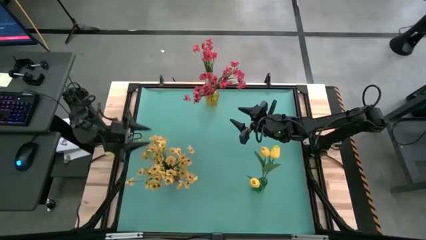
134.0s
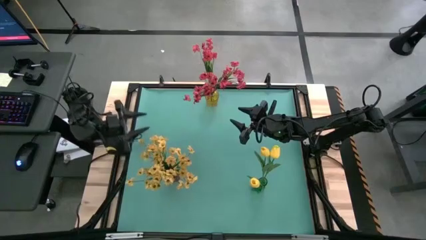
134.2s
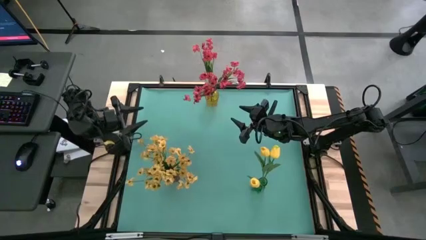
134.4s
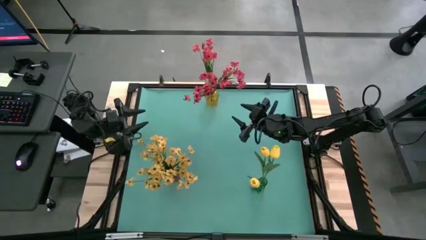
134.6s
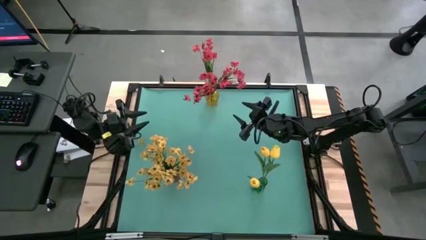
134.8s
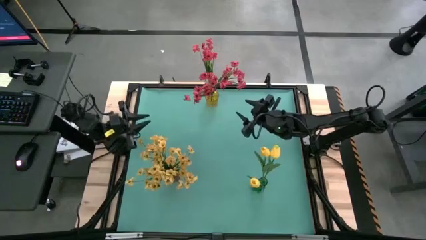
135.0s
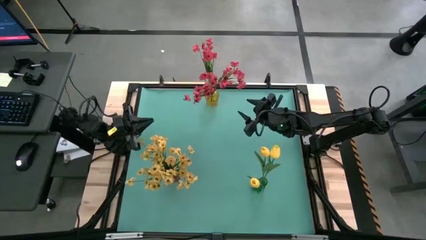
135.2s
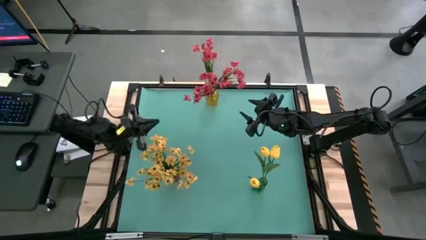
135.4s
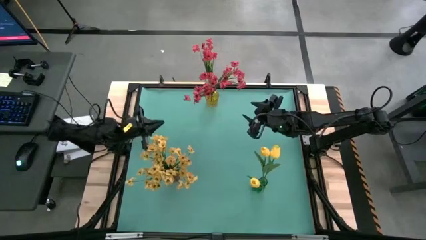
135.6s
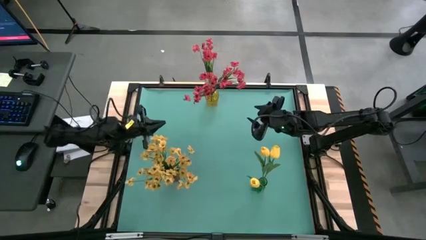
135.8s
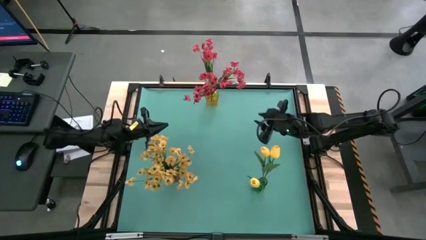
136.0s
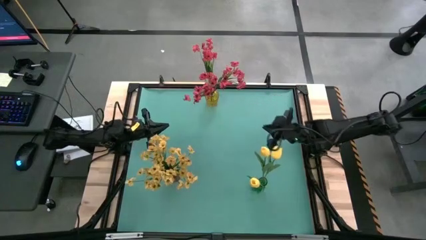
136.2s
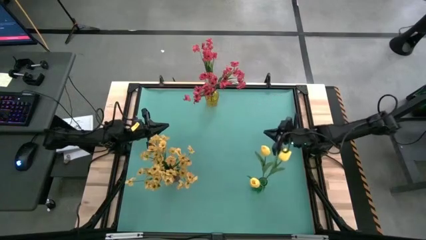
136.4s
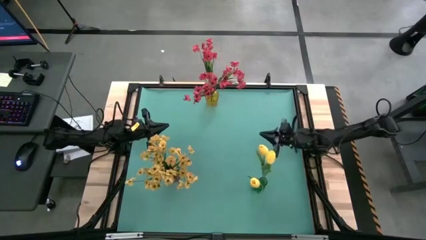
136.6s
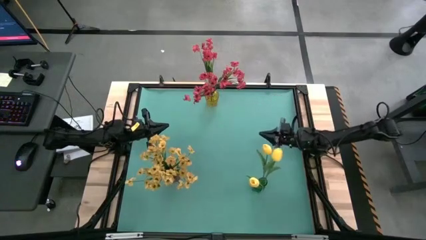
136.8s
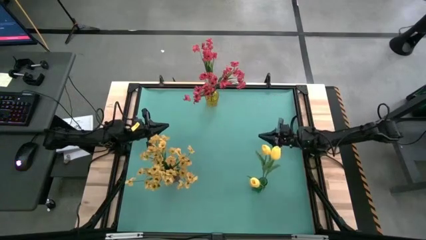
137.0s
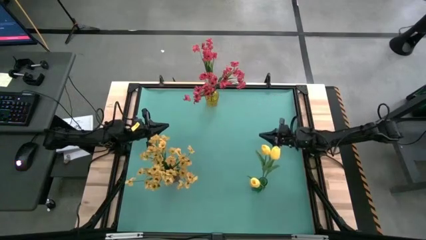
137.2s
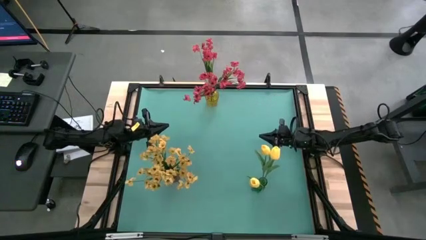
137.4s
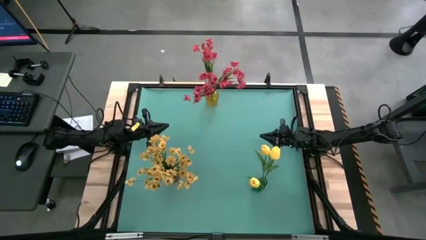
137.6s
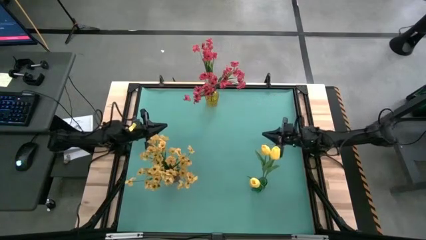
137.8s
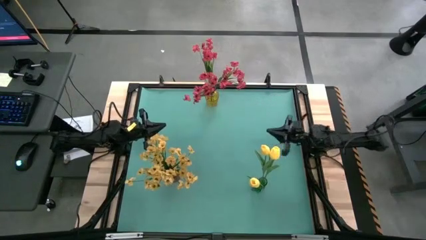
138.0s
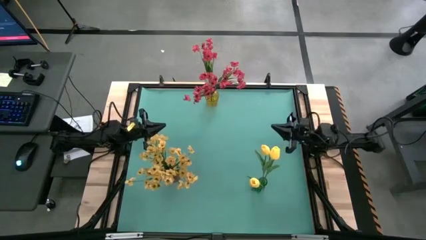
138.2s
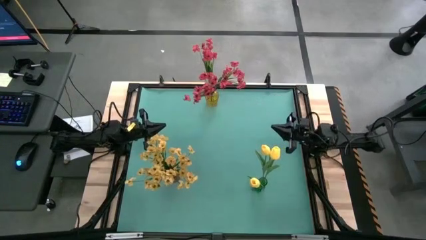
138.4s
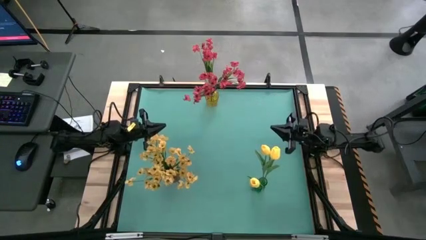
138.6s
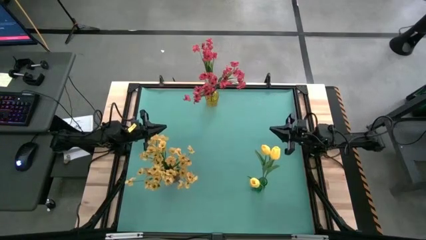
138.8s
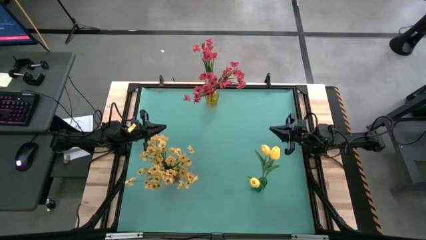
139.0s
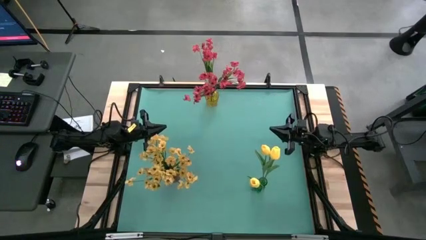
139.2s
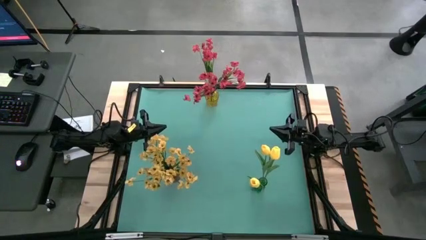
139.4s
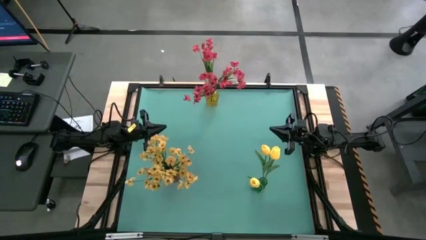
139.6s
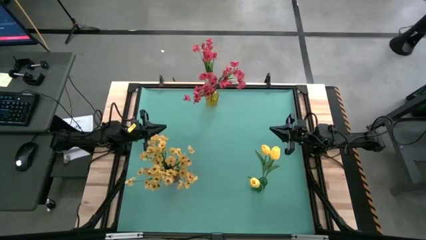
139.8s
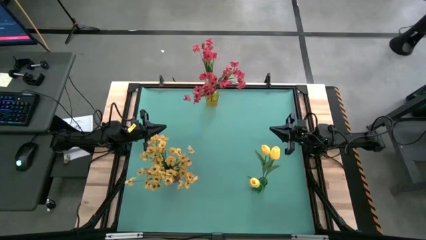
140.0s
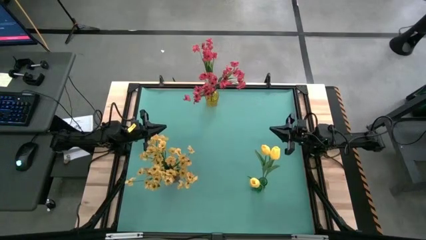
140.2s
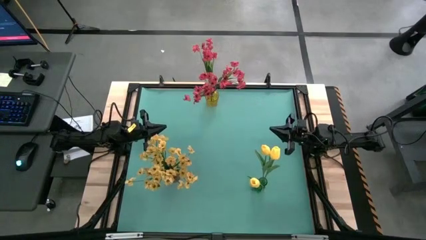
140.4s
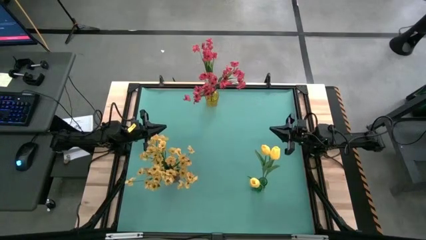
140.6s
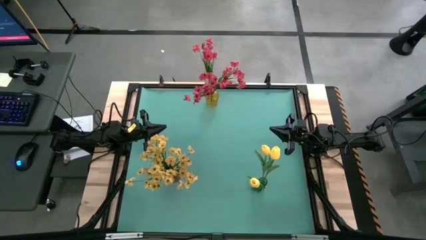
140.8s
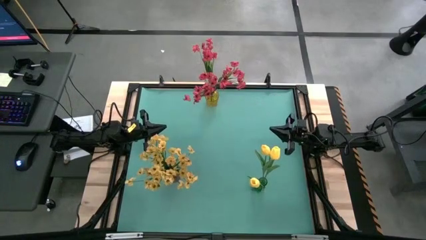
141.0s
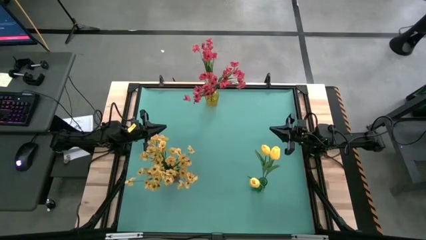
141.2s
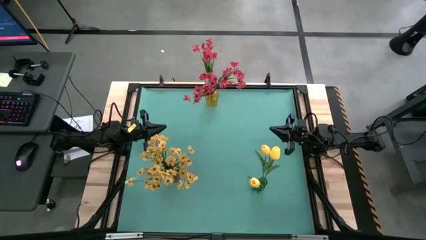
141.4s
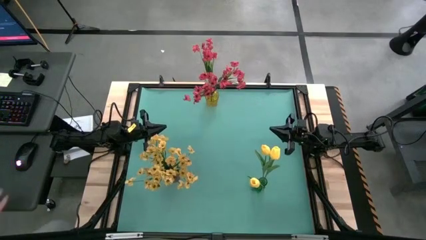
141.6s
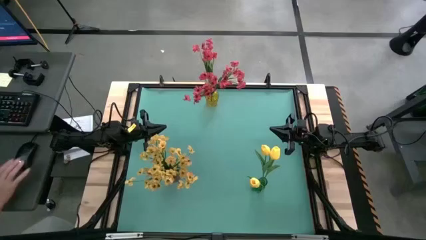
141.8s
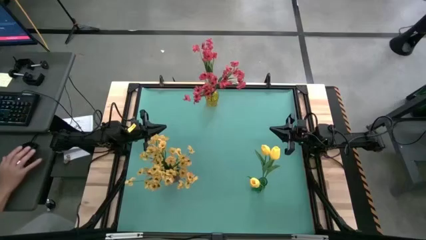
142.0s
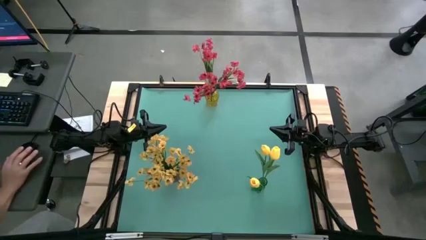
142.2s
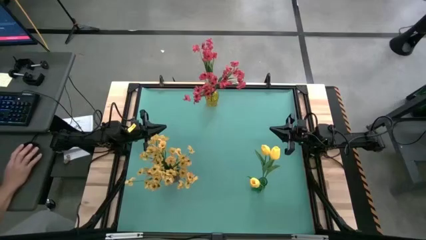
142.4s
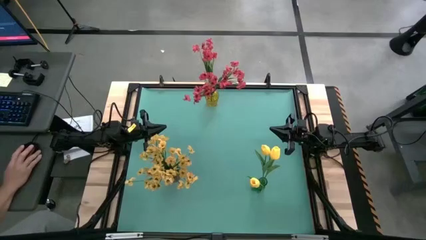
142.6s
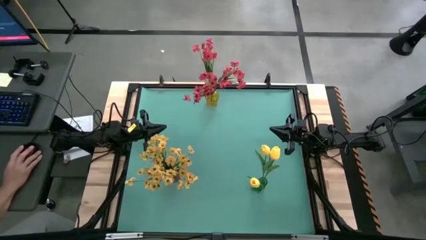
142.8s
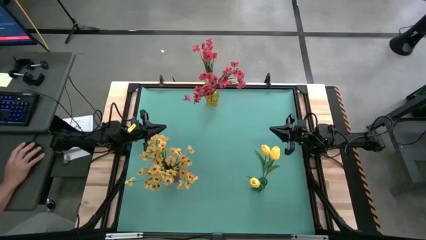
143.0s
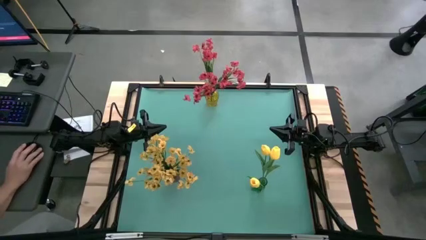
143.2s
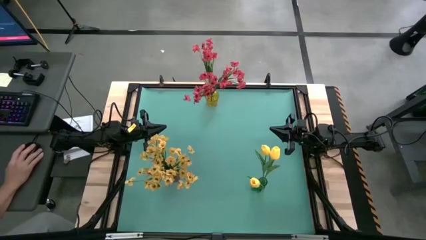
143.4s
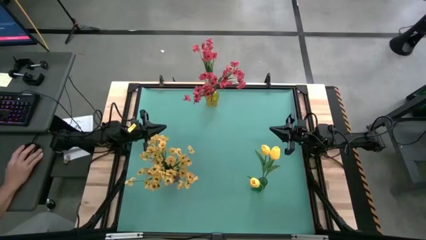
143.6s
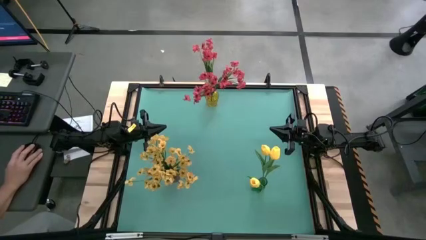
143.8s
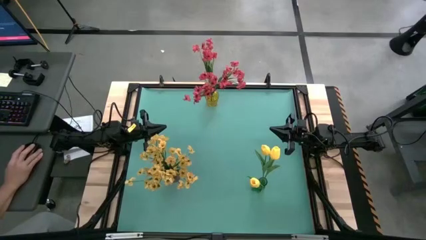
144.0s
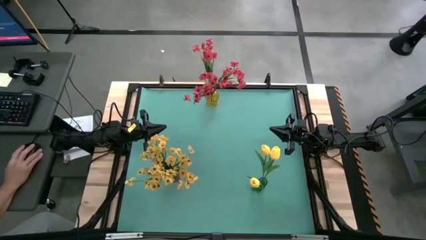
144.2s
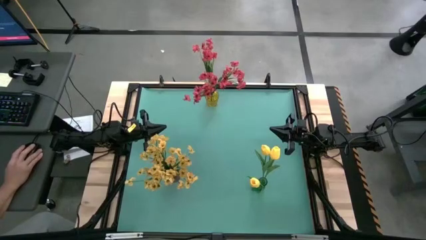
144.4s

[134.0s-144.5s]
Task: Sort flowers into vase by color
Return to Home Position
